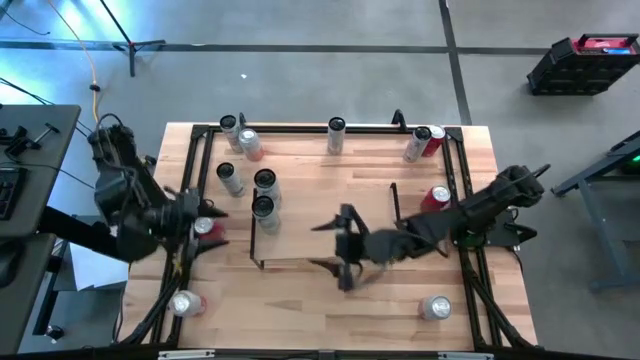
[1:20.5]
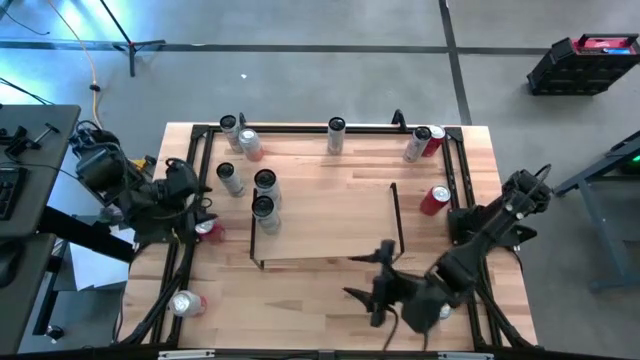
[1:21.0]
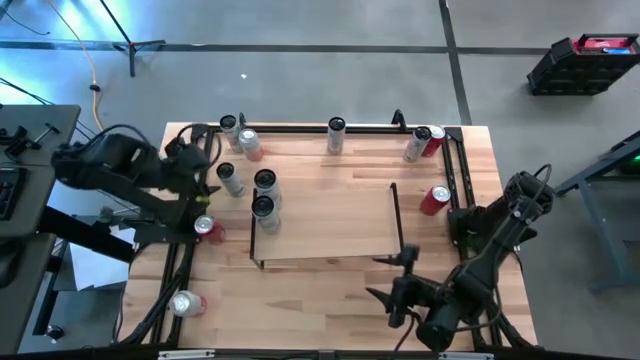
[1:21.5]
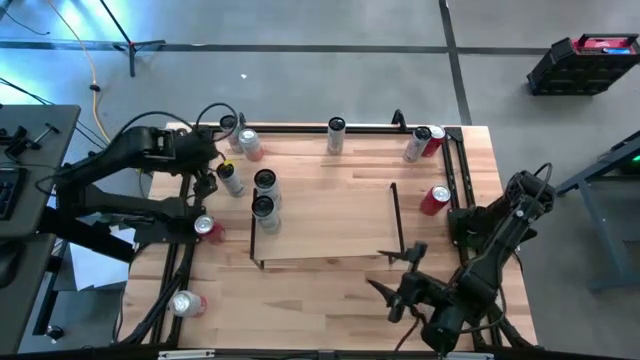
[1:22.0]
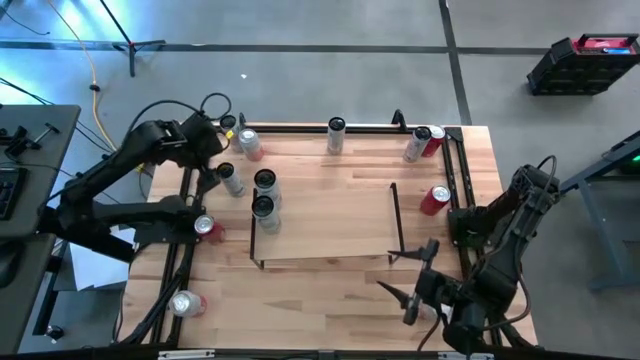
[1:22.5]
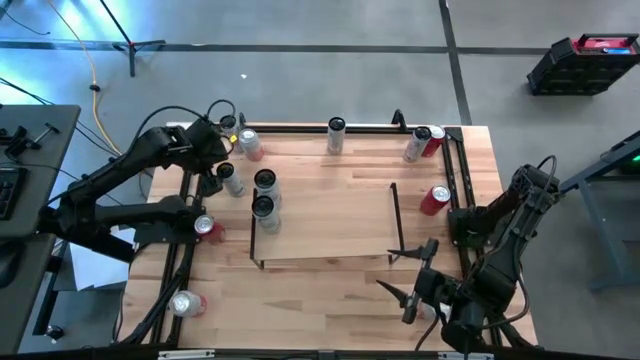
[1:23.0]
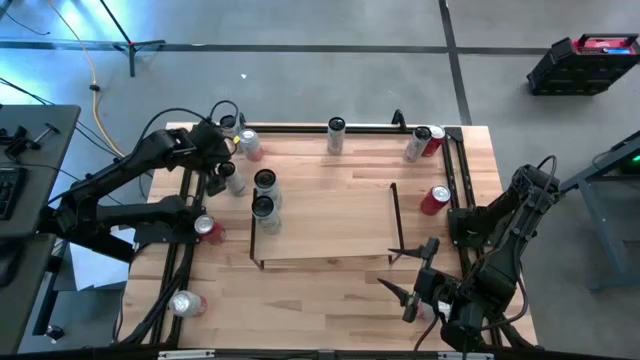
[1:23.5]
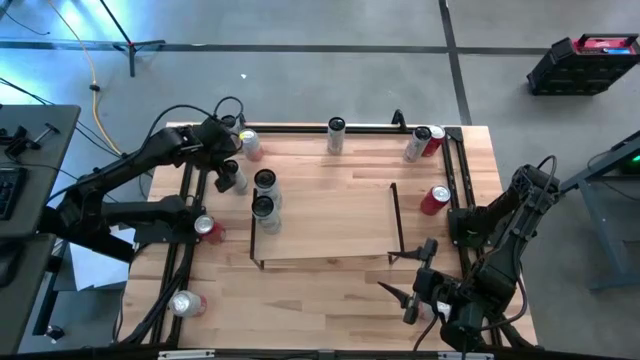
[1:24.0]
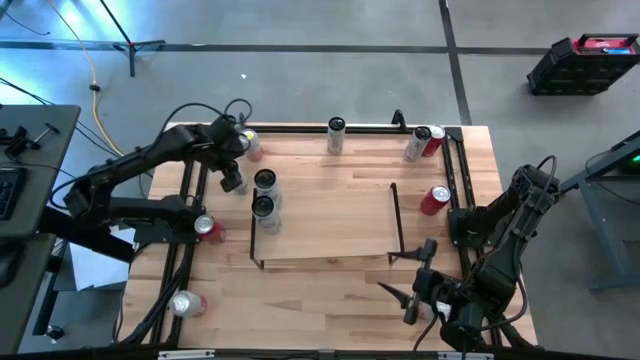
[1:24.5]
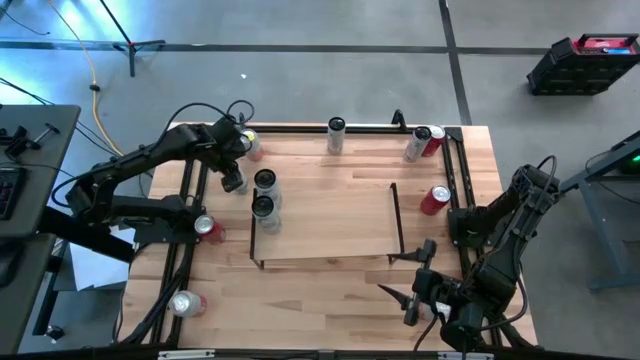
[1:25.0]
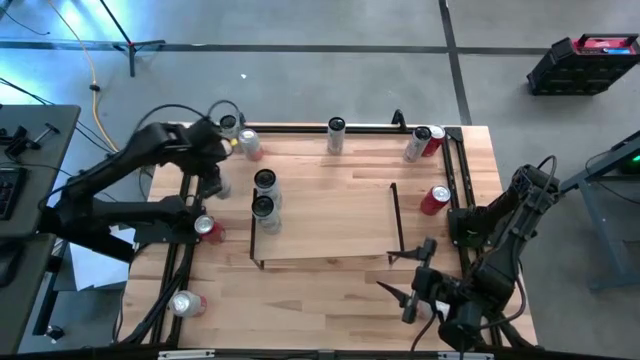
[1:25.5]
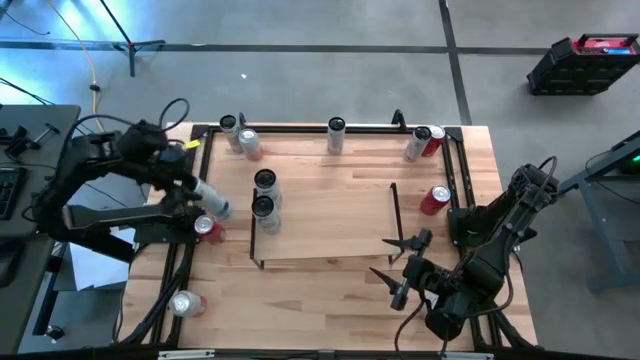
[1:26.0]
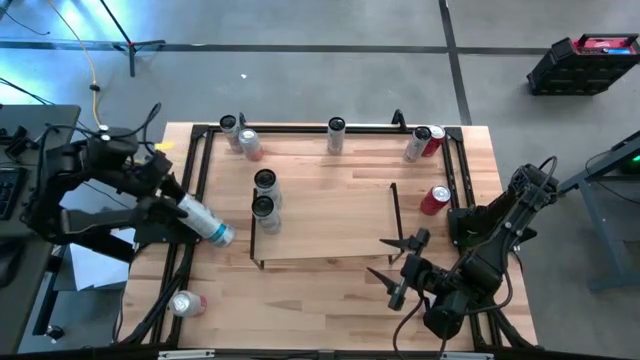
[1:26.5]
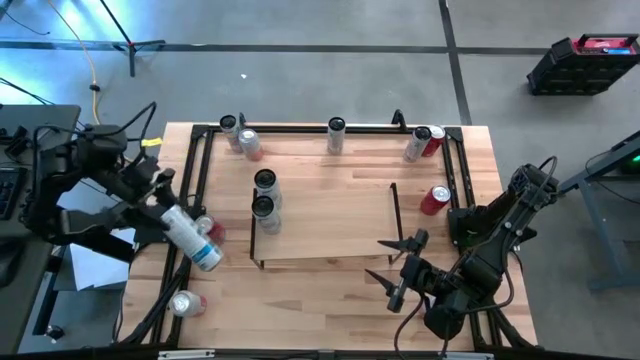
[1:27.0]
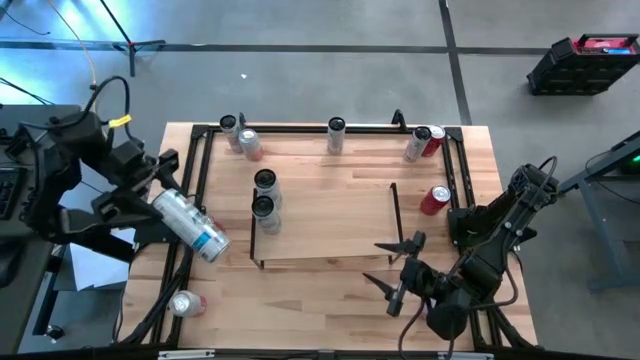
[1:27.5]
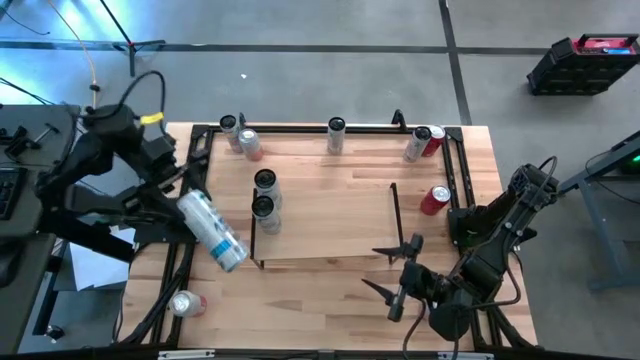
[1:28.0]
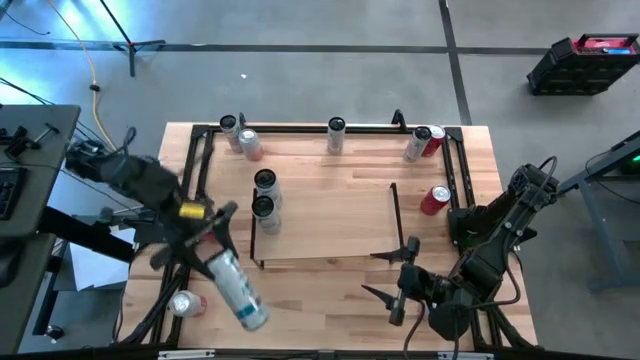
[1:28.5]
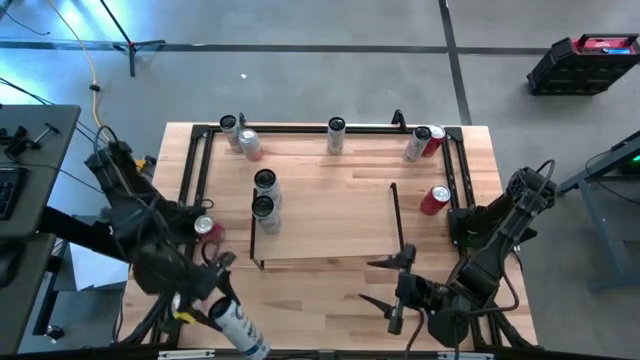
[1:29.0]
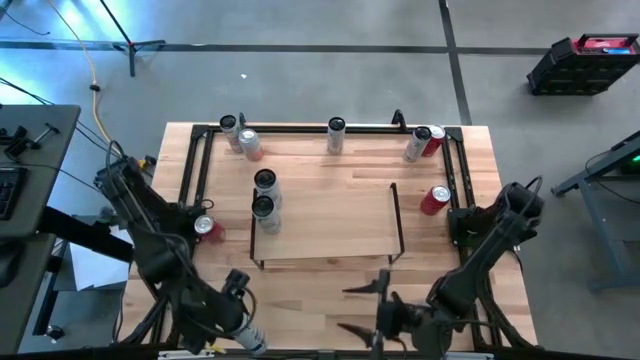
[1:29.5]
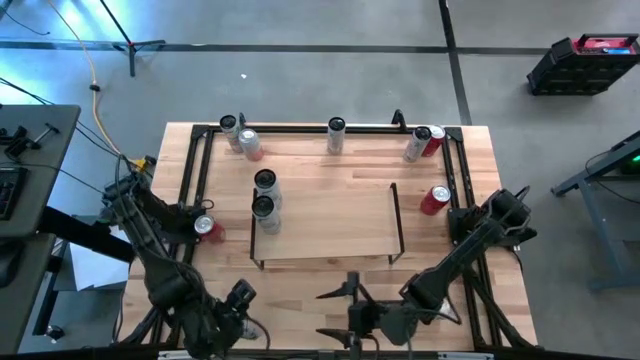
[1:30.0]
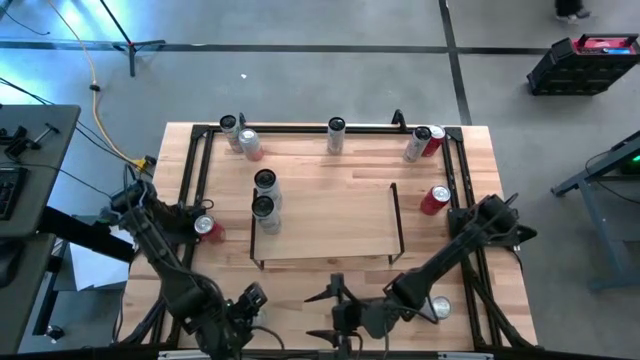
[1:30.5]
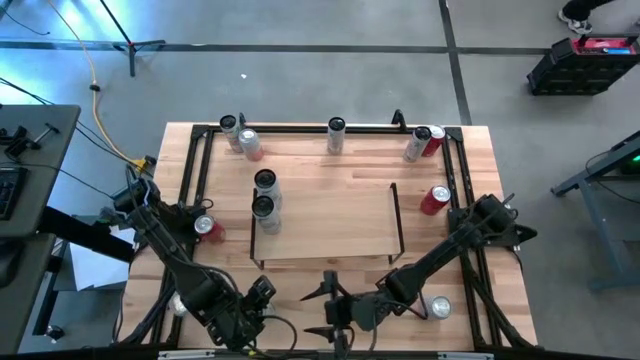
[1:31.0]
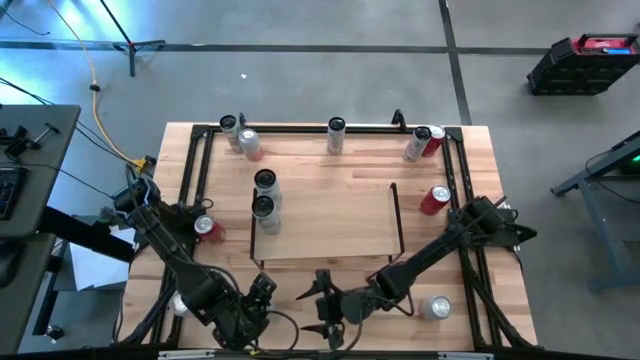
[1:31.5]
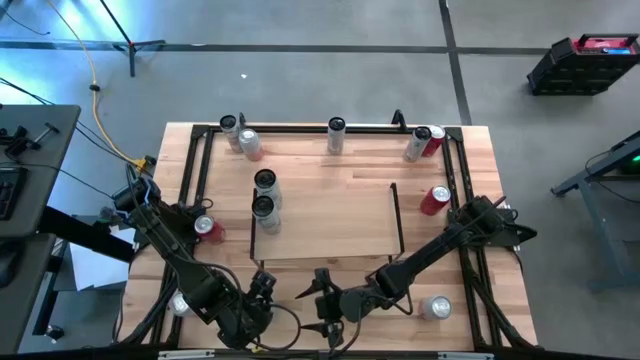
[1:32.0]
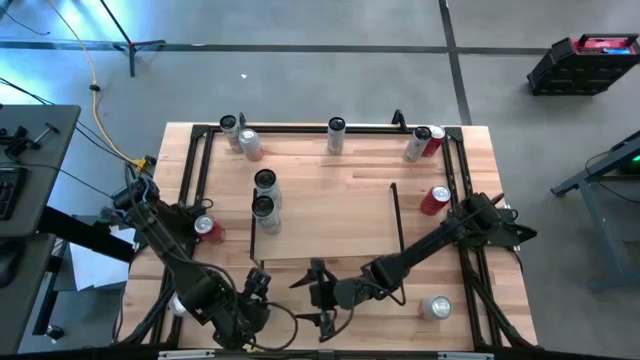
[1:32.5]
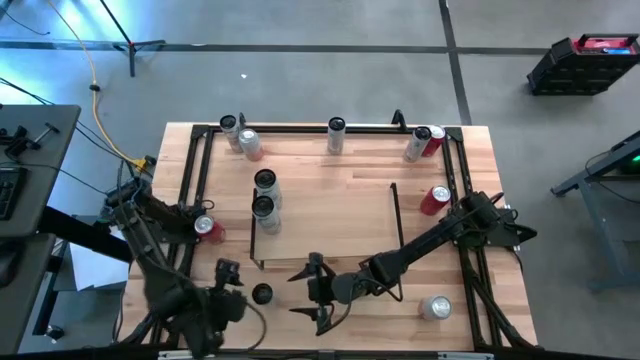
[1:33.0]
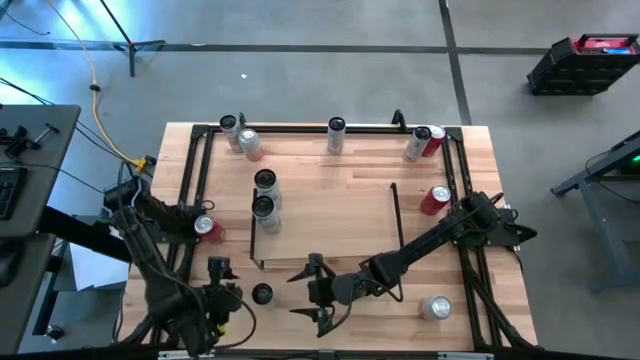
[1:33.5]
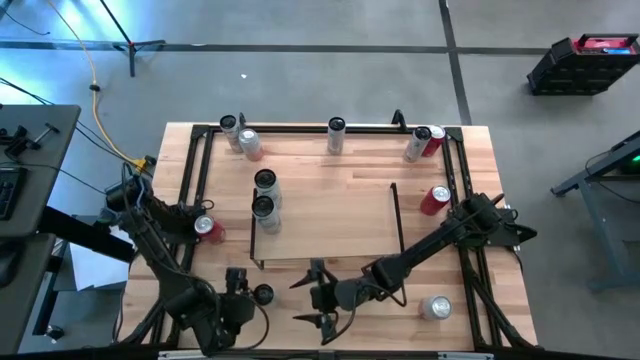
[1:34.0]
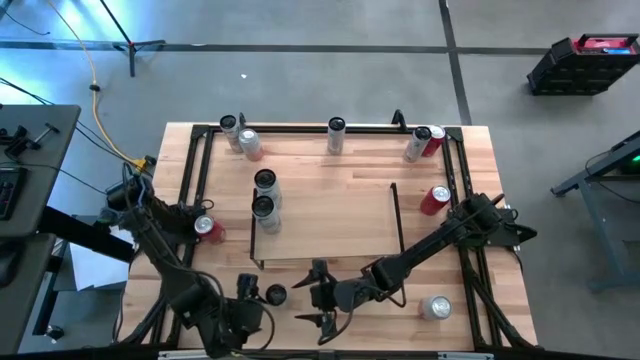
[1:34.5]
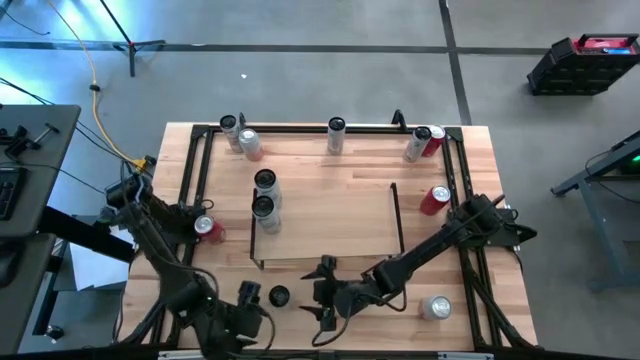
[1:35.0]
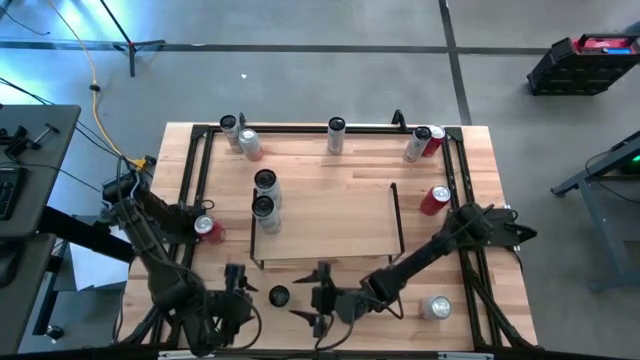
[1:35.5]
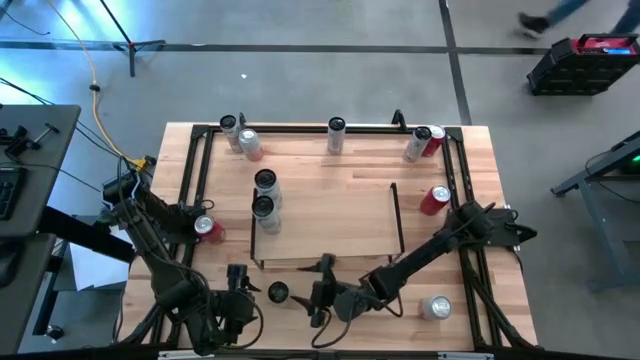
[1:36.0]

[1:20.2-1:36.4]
Task: Place canned beverage on shelf
Put the white blue soda can aligned with the other white blue soda cans on the shelf

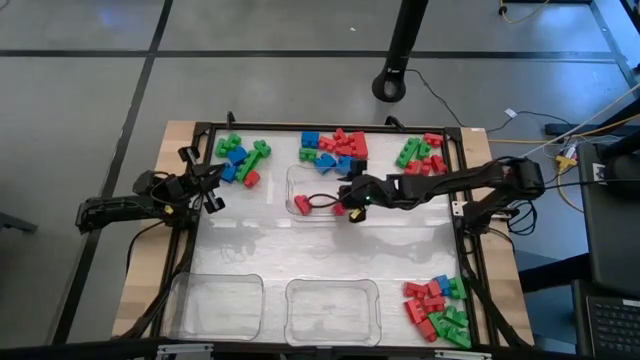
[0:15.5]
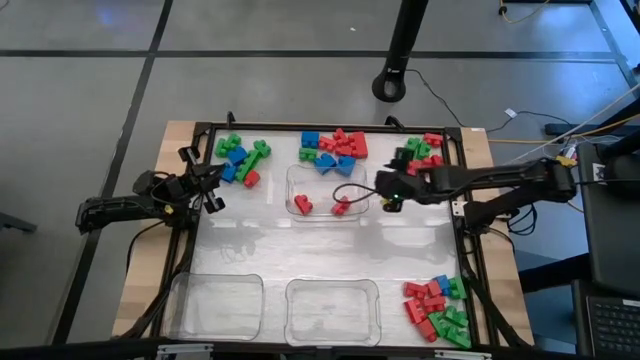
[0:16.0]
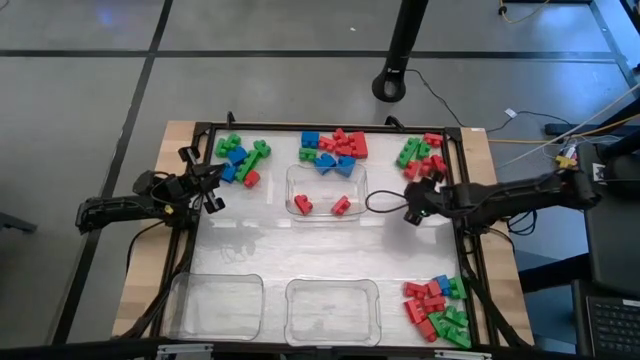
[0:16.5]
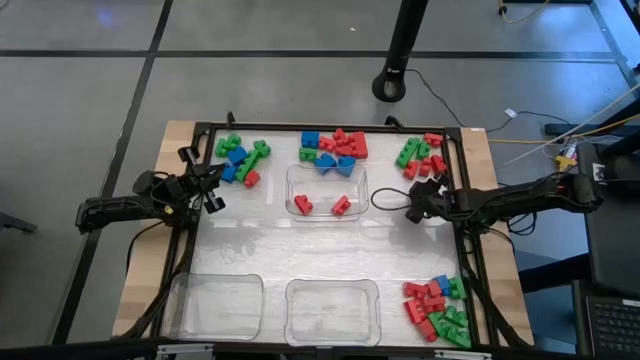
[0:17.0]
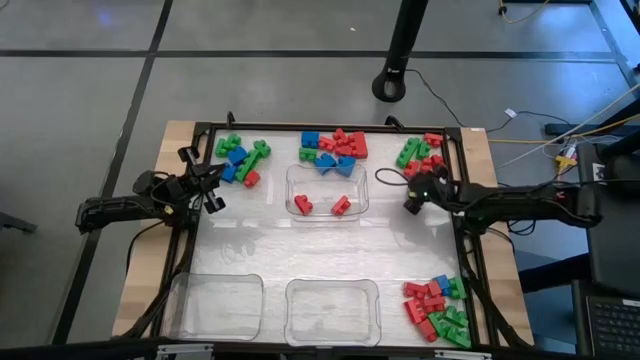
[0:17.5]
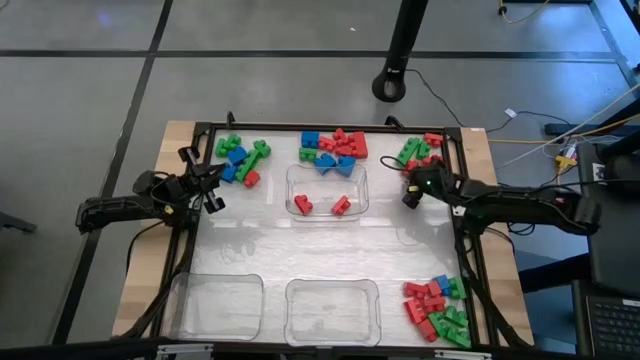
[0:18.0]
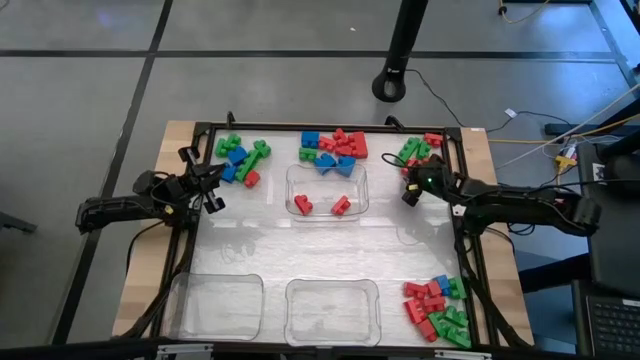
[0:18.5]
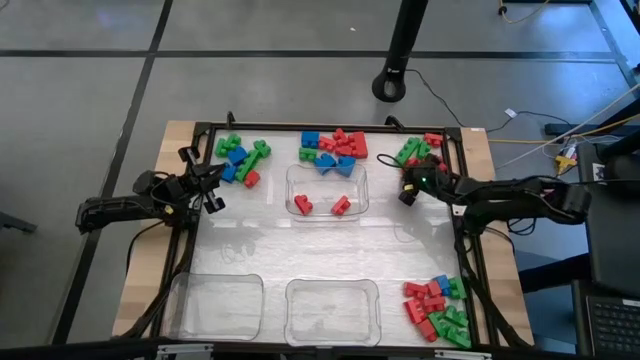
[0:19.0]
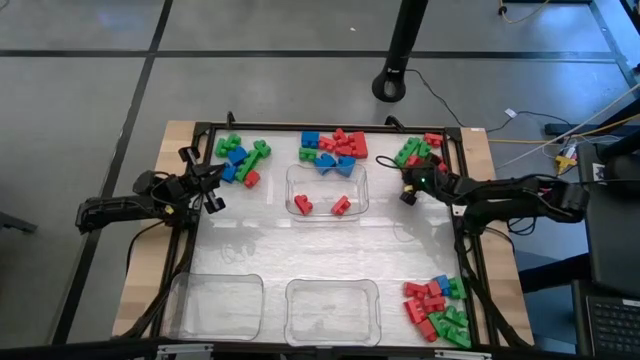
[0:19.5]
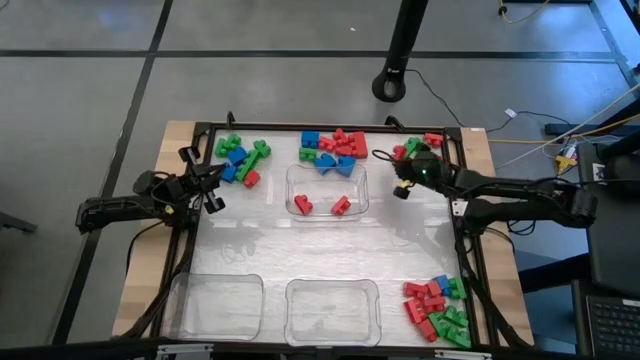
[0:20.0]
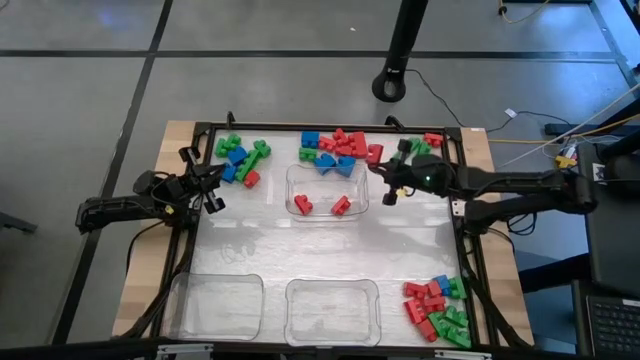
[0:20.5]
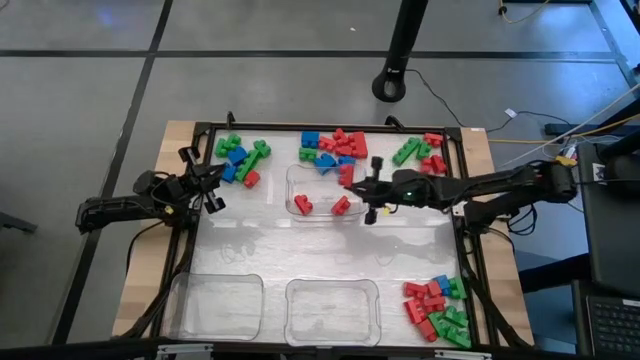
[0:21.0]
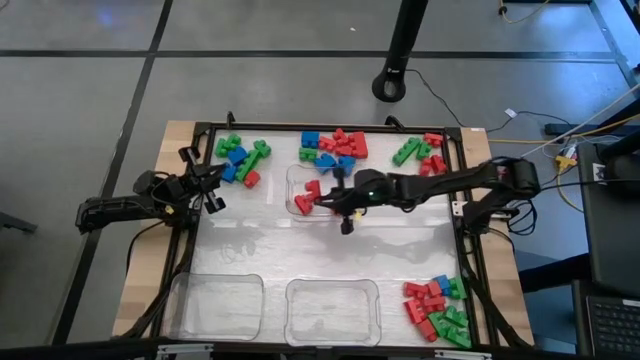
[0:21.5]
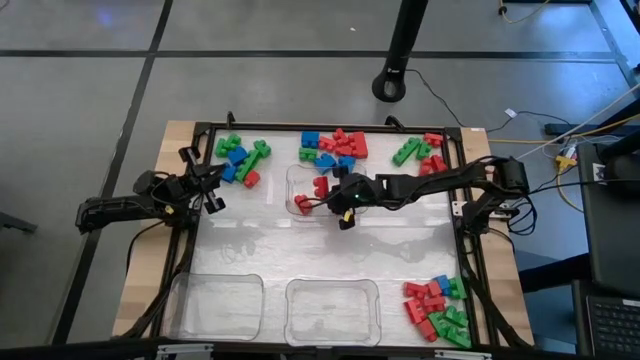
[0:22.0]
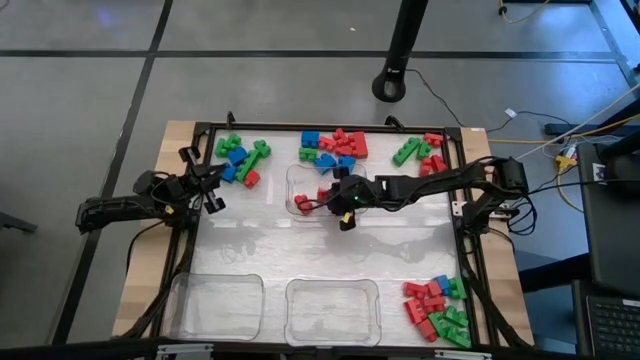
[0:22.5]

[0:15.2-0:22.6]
Task: Sort blocks
Put the red game piece into the top right transparent bin
